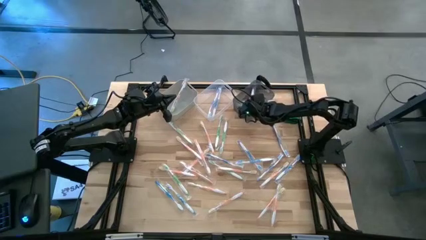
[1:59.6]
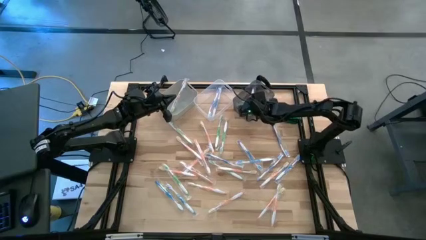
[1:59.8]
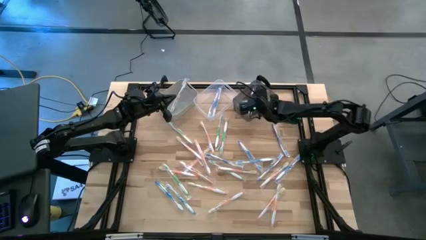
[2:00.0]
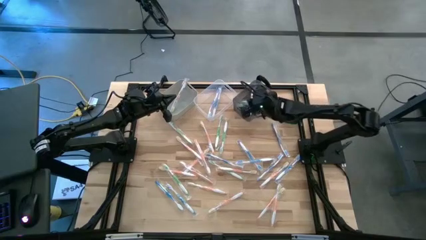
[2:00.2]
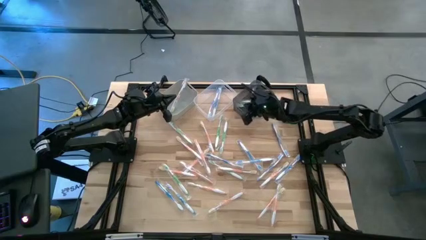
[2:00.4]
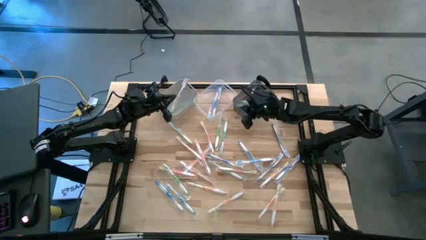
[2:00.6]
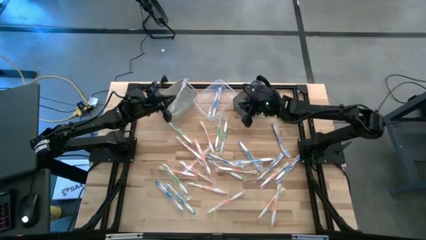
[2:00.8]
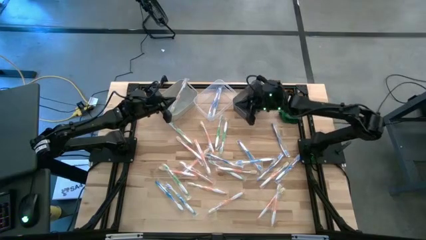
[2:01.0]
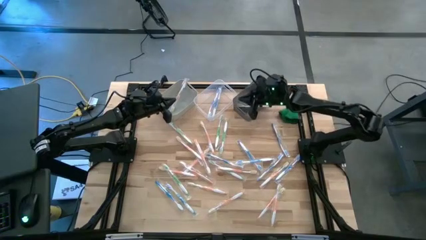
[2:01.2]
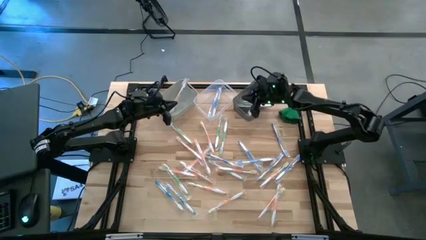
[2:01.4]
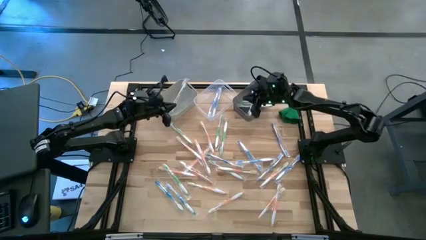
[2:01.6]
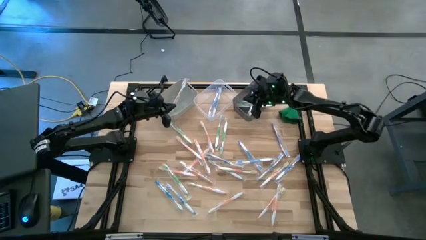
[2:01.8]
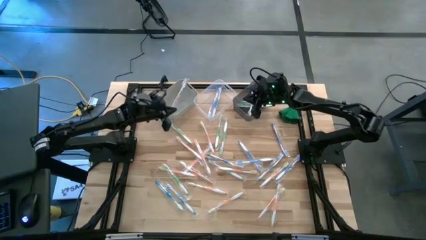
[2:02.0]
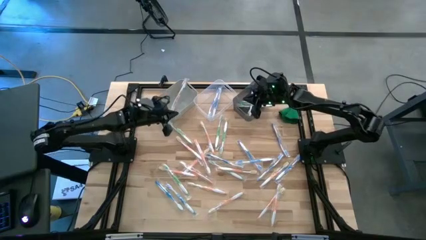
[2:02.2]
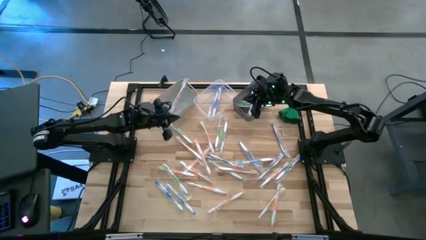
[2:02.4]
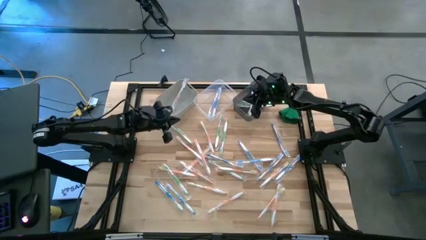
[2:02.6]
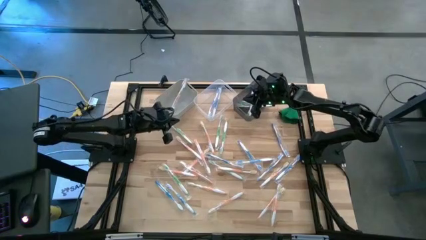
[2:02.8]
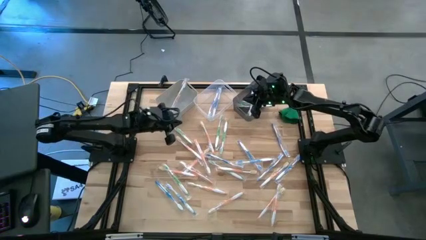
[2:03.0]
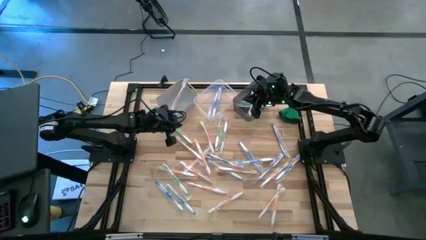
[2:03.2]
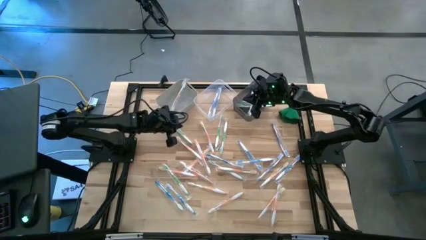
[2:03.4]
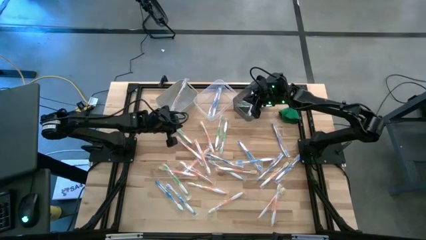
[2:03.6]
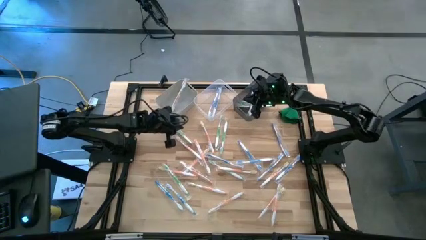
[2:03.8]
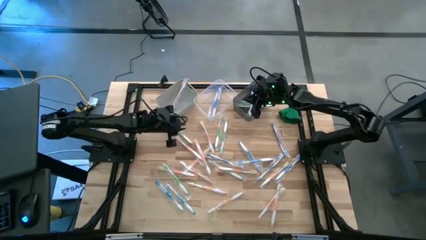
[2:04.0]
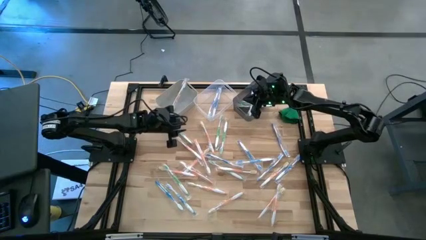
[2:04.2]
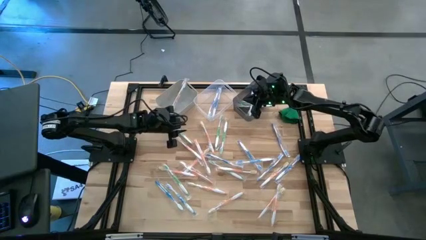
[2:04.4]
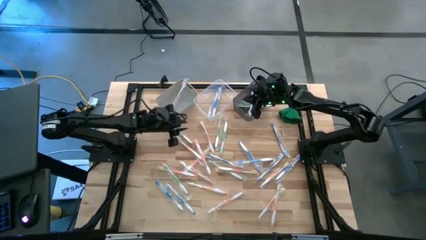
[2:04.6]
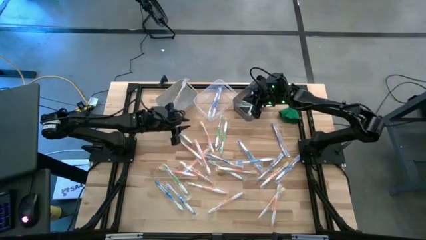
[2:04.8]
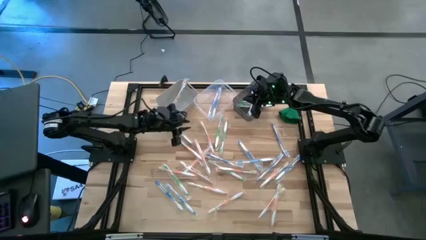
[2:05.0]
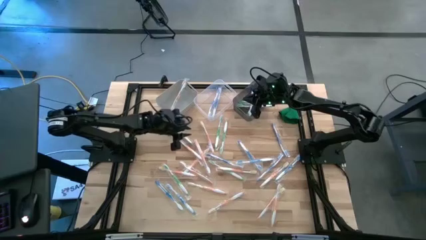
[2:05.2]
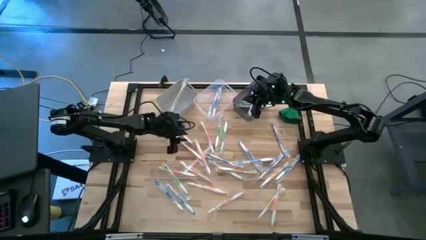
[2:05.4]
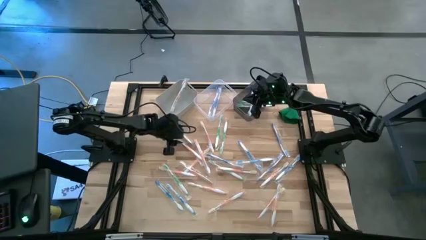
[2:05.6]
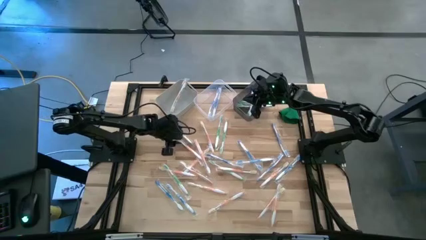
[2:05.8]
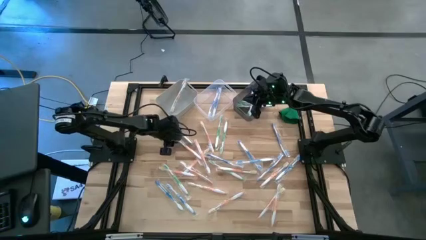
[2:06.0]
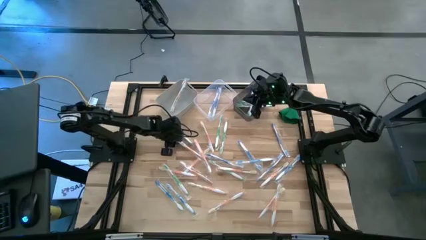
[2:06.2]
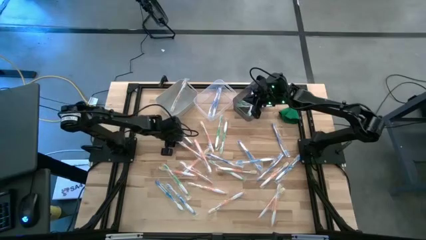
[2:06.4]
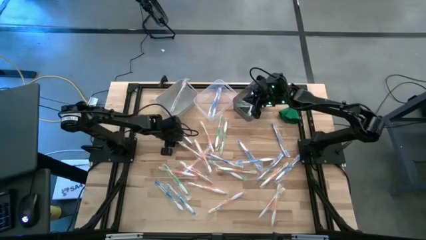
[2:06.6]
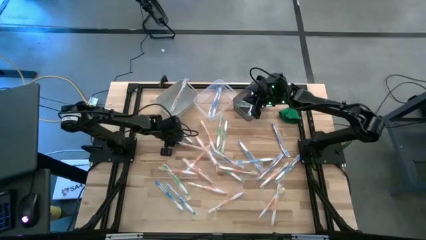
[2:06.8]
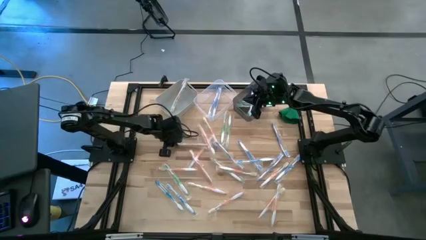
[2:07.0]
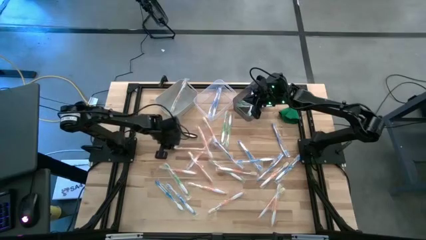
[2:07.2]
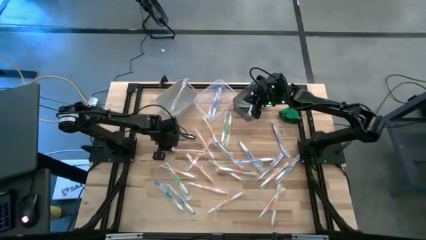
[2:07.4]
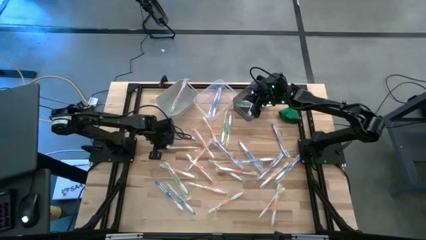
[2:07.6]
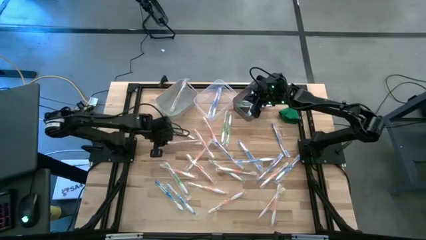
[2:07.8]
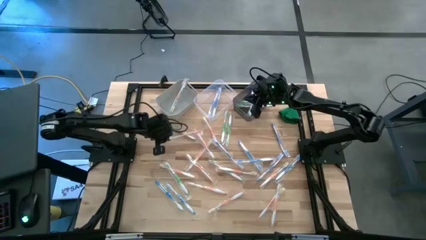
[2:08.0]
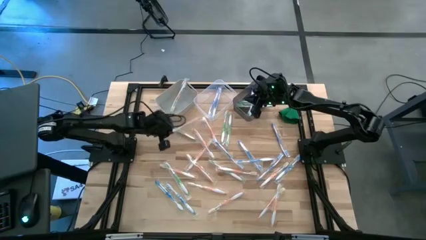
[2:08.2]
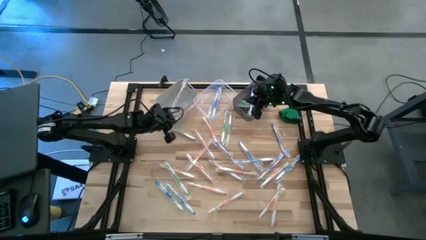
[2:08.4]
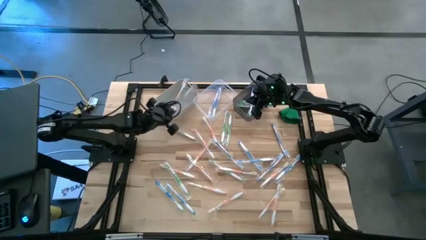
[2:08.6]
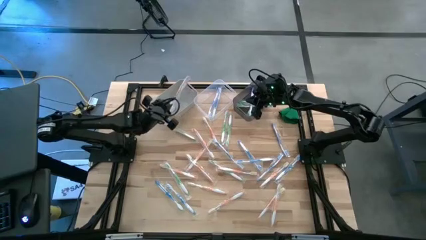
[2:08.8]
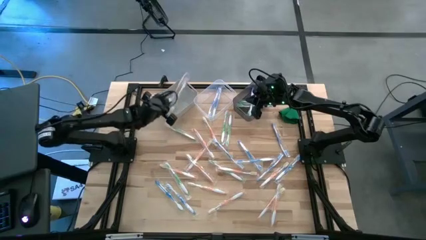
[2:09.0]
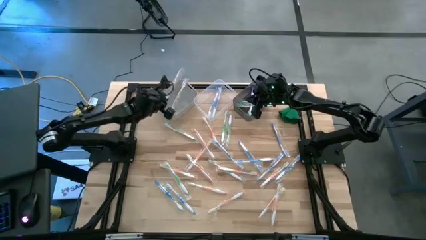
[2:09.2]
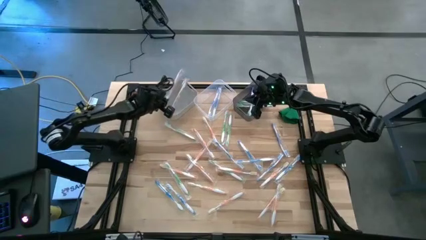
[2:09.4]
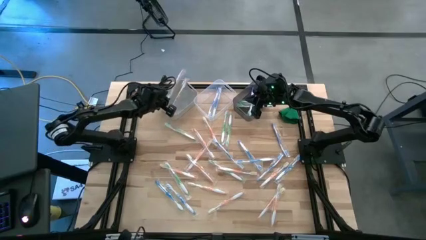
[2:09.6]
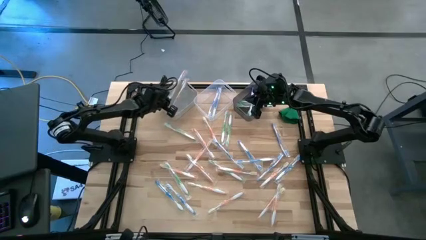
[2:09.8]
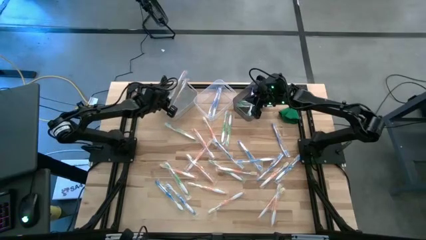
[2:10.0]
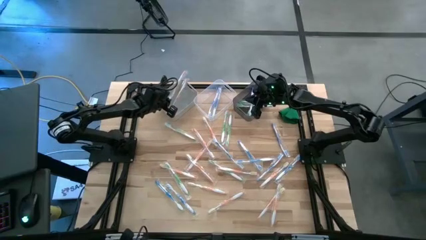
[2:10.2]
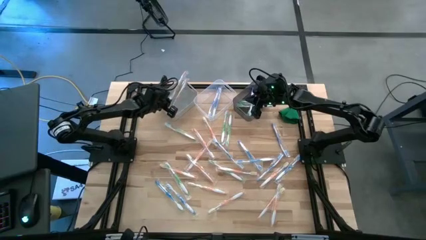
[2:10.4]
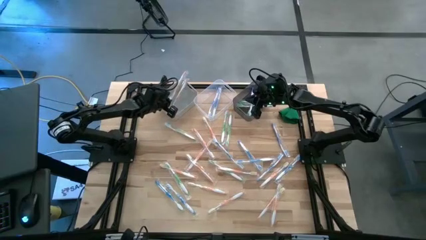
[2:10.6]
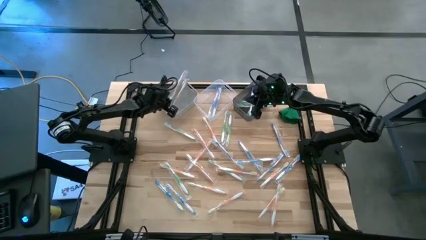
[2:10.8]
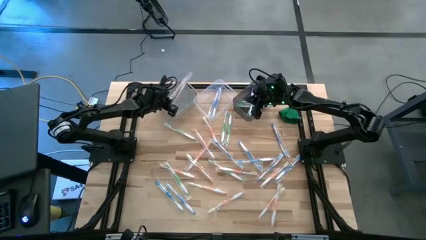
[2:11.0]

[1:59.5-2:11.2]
Task: Pick & Place Toothbrushes
Put the orange toothbrush into the white bin

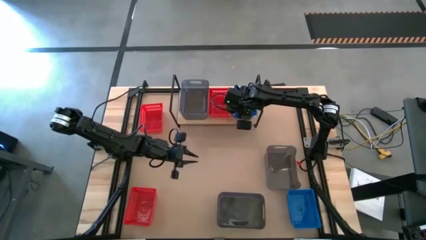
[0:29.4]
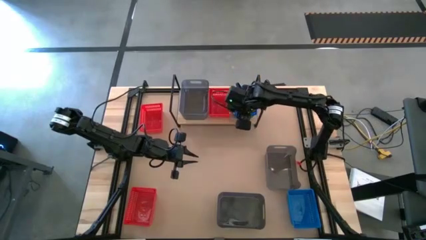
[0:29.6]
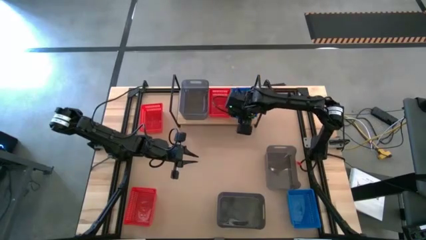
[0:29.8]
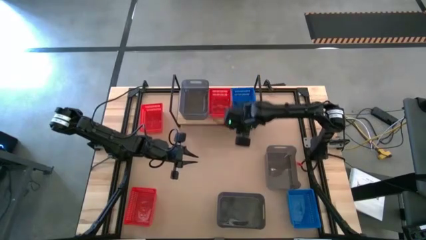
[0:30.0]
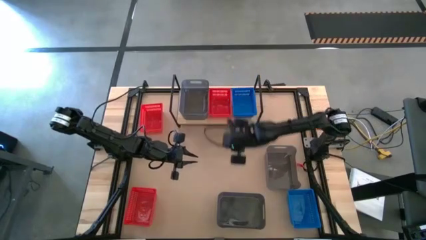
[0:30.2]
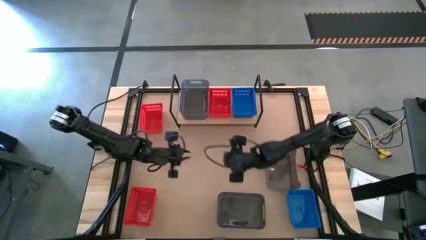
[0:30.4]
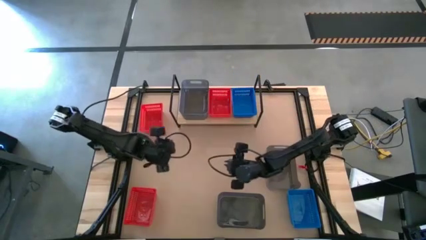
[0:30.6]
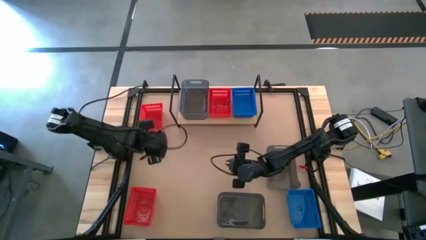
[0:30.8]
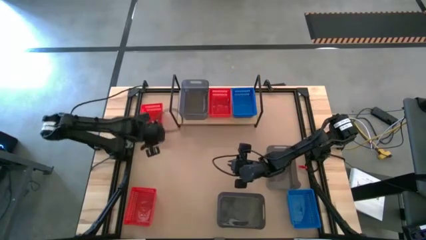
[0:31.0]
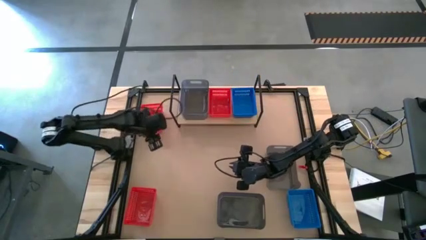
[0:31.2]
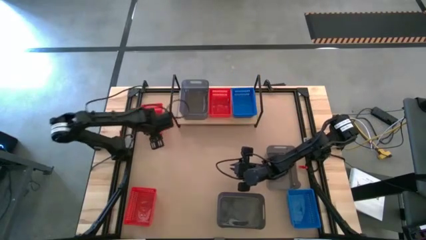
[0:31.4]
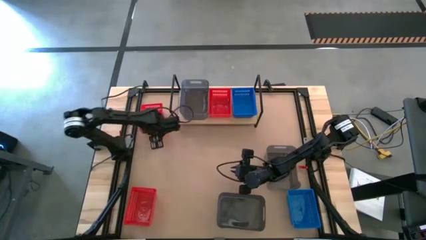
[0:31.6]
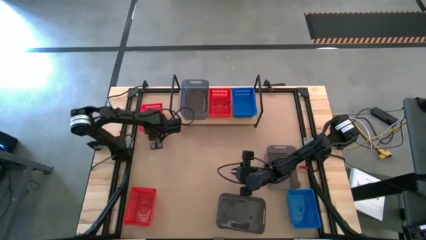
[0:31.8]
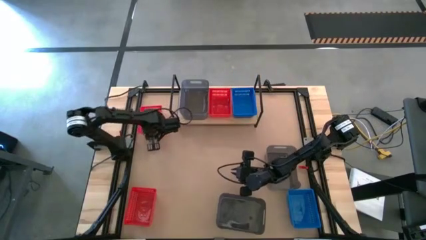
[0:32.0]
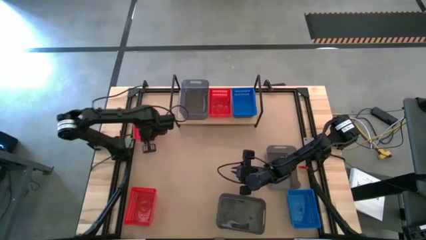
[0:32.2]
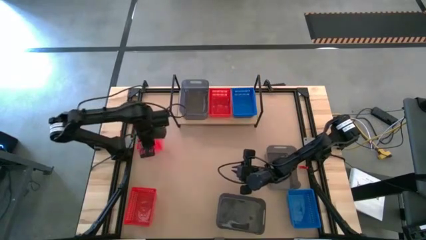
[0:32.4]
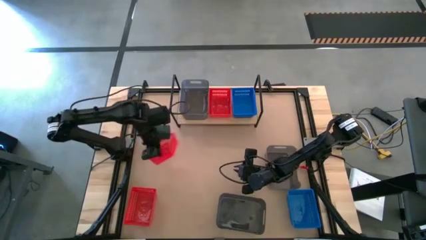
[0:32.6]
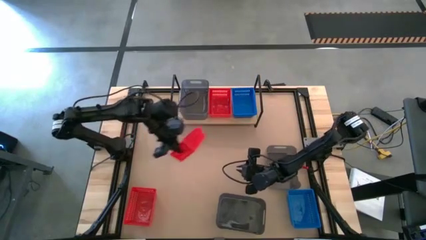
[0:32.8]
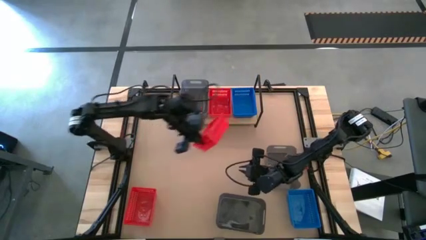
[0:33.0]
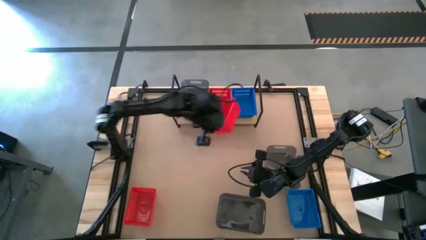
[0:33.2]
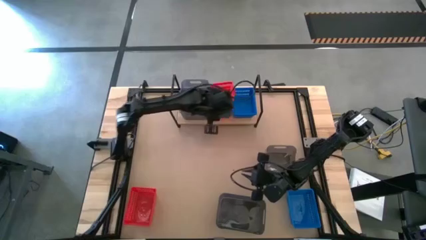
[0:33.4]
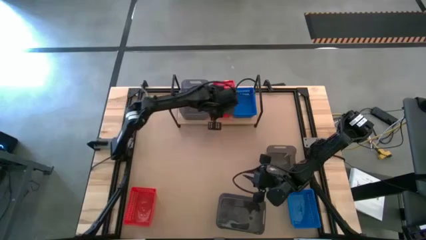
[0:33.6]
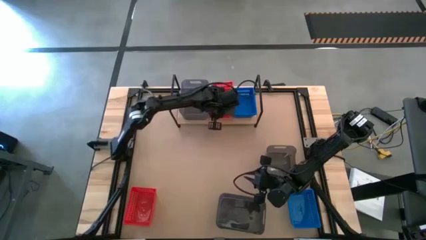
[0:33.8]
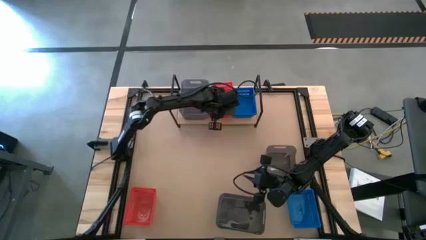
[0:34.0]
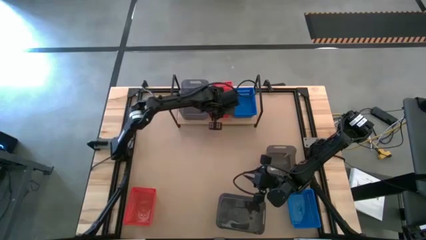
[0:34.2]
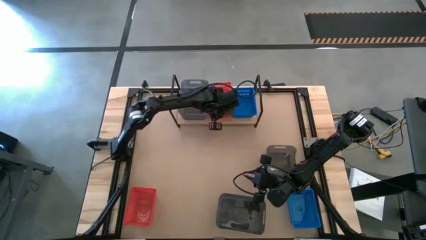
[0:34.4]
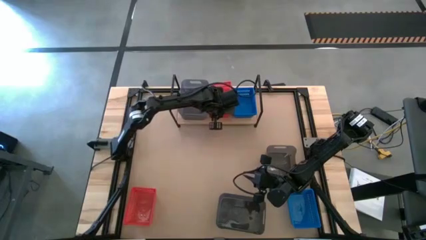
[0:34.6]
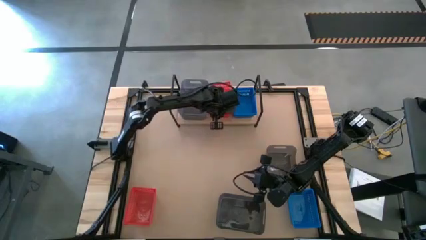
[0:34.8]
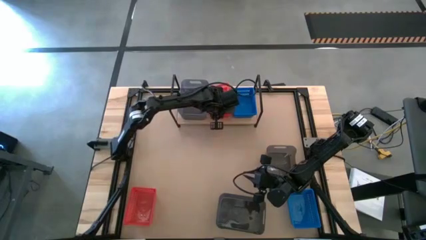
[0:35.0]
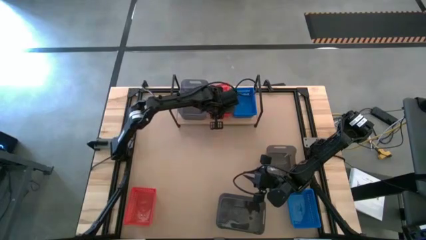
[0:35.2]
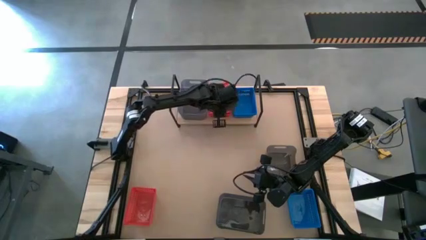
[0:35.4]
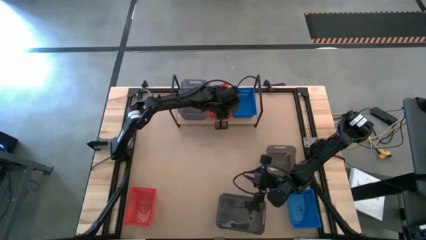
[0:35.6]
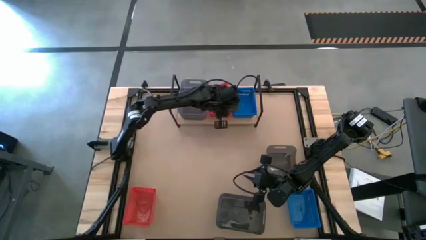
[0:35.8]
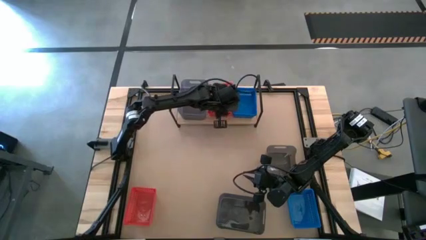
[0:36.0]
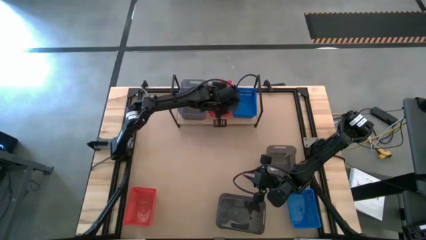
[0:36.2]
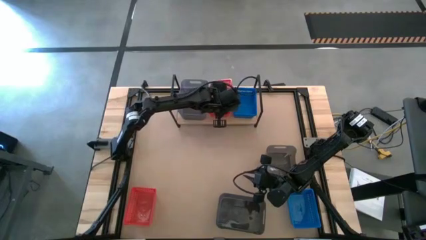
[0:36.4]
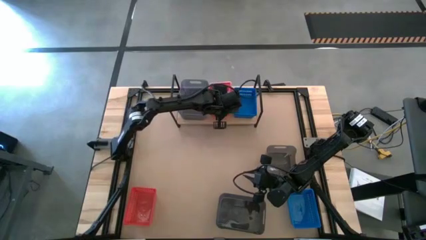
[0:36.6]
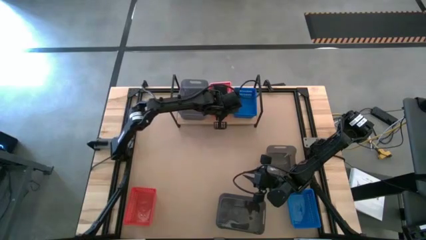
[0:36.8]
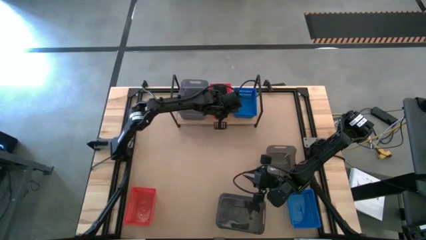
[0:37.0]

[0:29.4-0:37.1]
Task: Stack baskets on shelf by color
Stack the top red bin on the other red bin on the shelf
